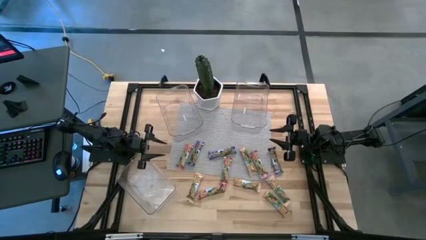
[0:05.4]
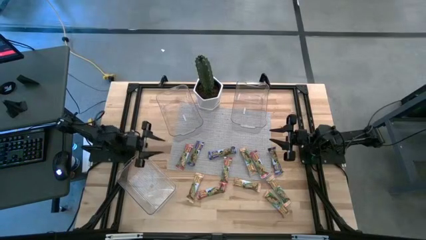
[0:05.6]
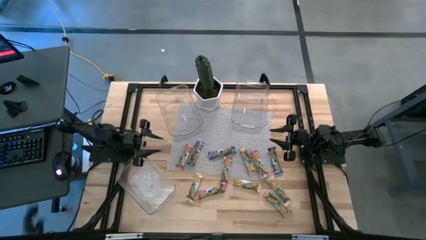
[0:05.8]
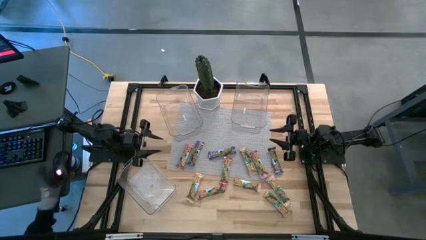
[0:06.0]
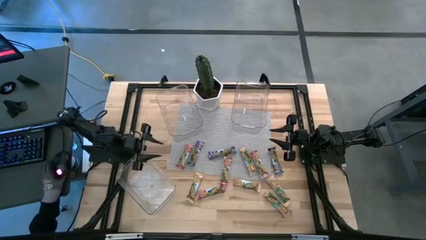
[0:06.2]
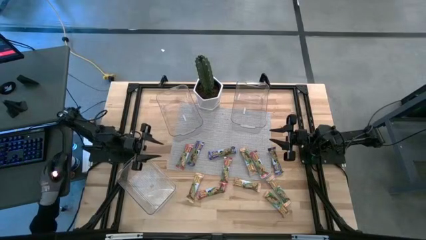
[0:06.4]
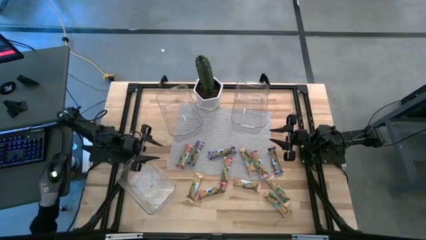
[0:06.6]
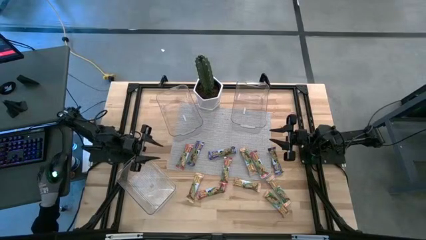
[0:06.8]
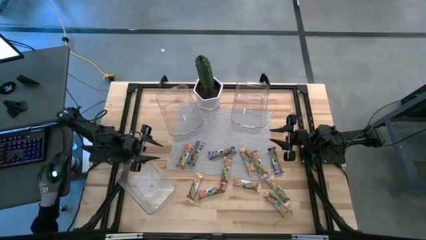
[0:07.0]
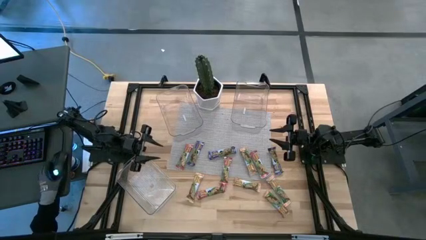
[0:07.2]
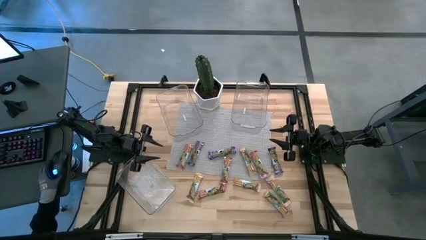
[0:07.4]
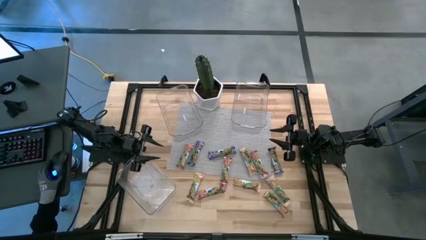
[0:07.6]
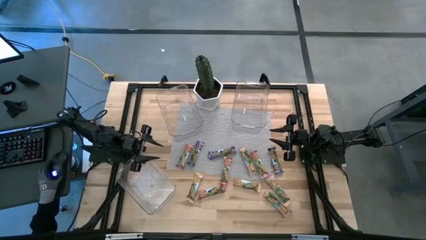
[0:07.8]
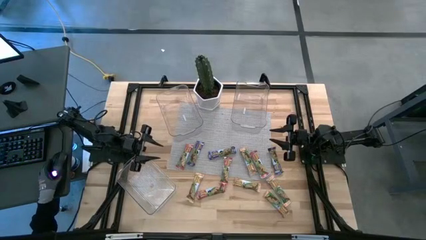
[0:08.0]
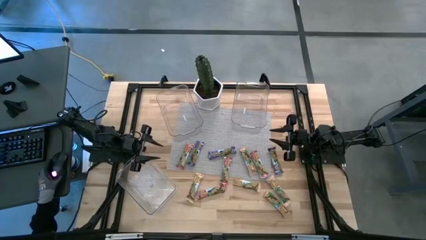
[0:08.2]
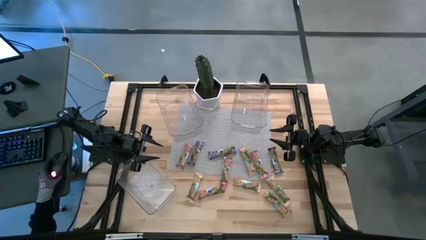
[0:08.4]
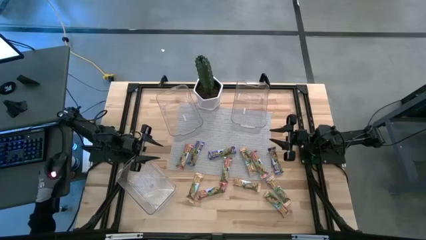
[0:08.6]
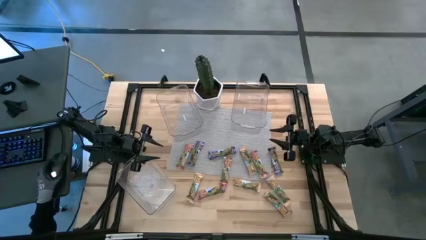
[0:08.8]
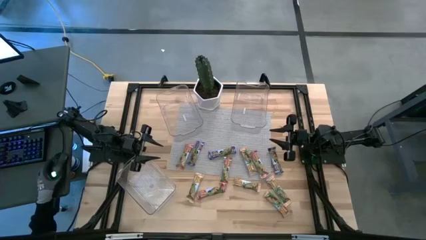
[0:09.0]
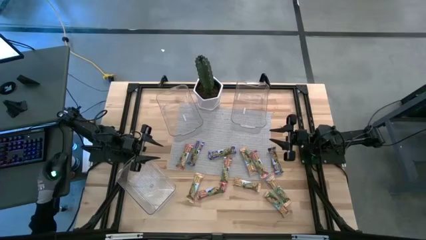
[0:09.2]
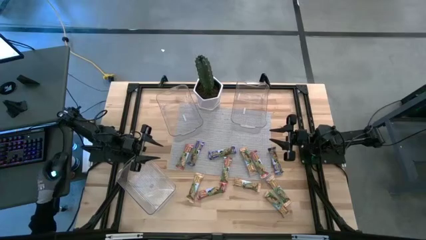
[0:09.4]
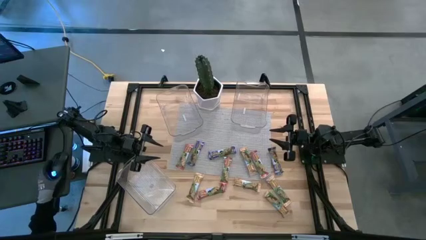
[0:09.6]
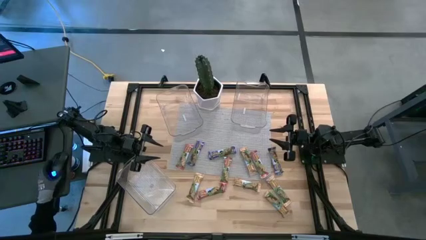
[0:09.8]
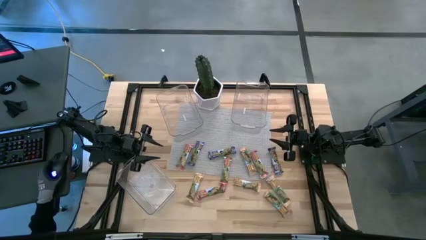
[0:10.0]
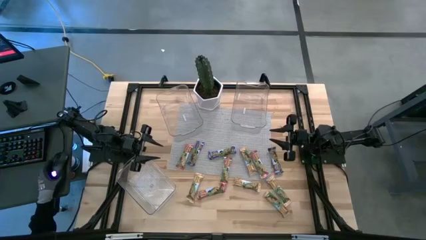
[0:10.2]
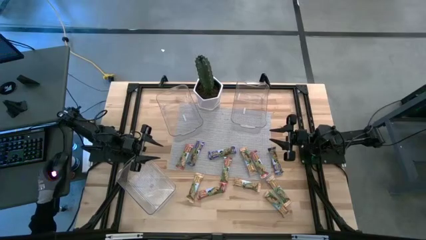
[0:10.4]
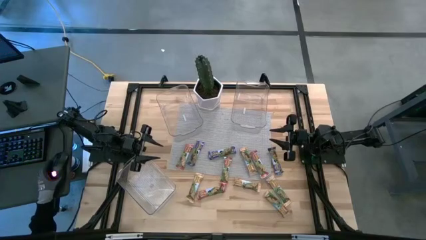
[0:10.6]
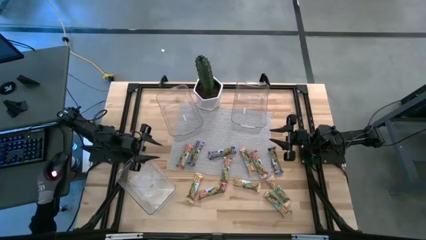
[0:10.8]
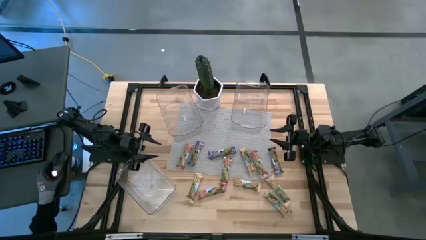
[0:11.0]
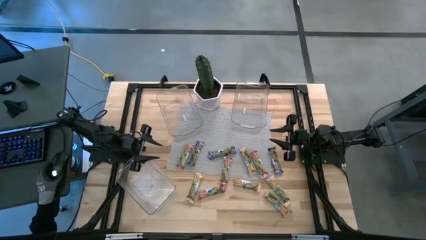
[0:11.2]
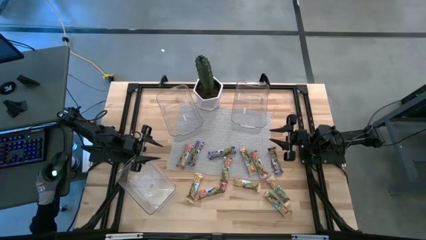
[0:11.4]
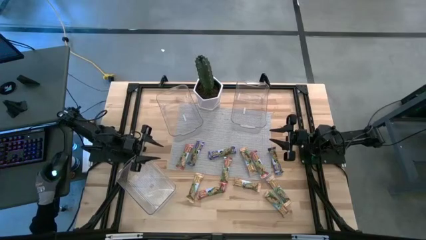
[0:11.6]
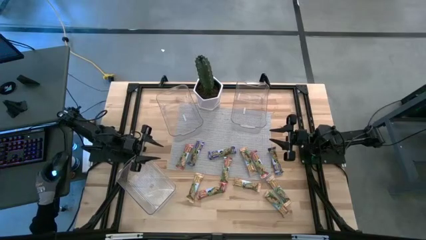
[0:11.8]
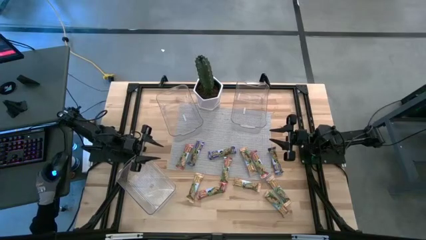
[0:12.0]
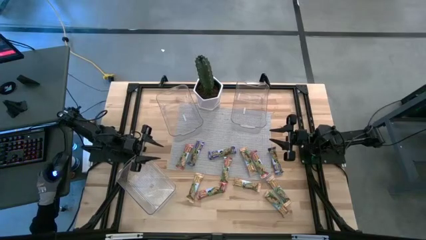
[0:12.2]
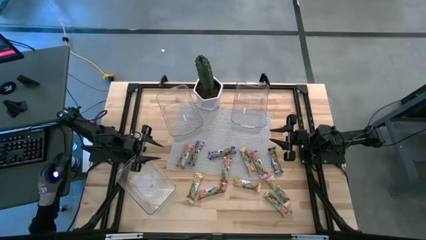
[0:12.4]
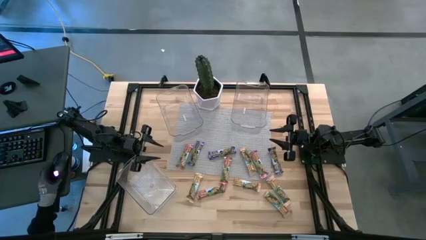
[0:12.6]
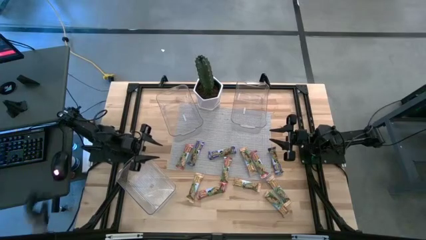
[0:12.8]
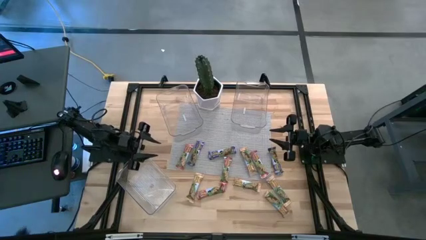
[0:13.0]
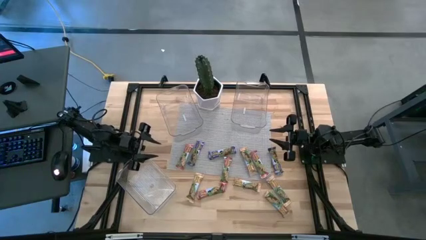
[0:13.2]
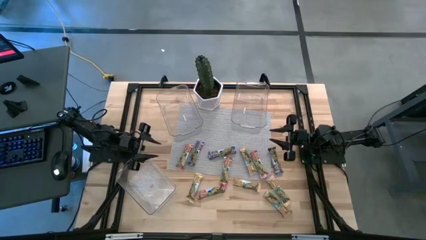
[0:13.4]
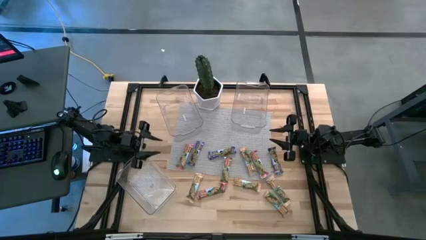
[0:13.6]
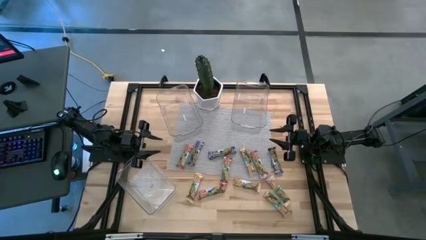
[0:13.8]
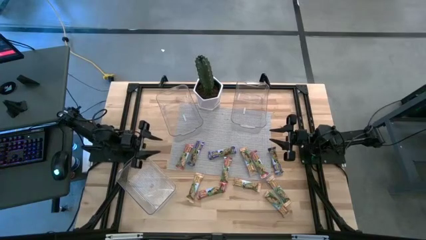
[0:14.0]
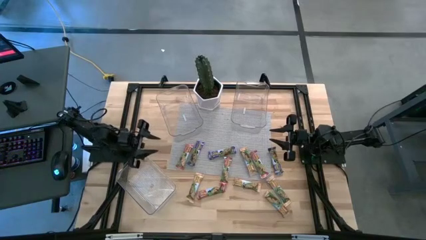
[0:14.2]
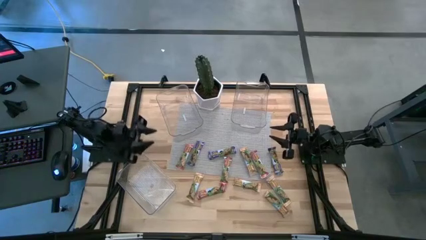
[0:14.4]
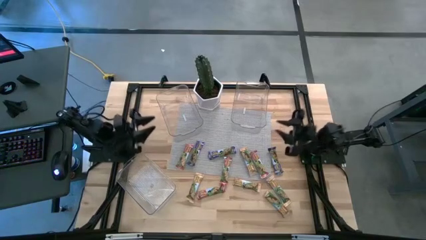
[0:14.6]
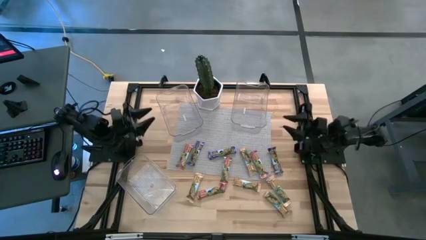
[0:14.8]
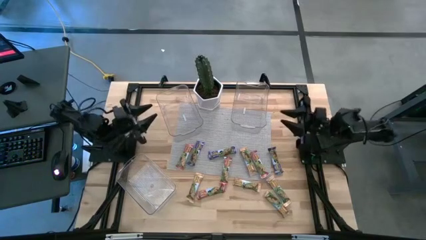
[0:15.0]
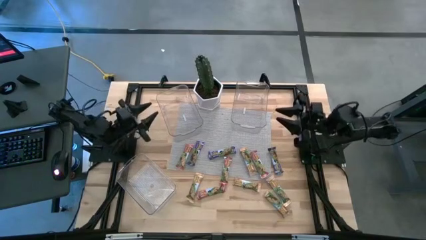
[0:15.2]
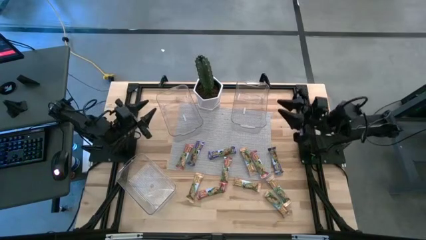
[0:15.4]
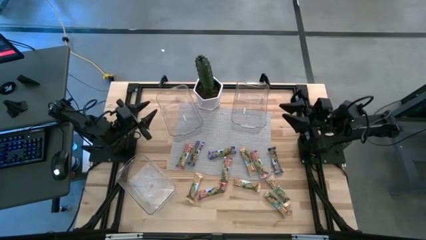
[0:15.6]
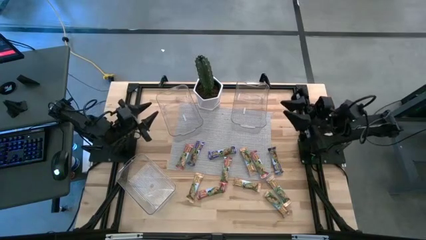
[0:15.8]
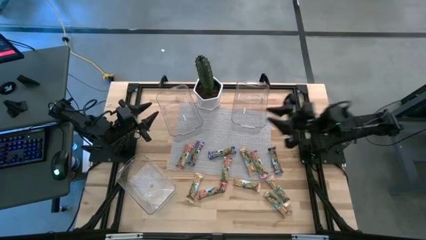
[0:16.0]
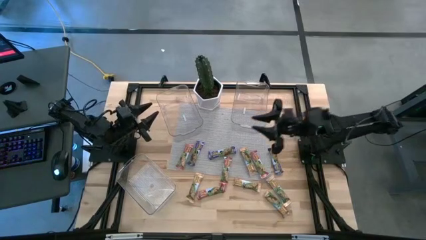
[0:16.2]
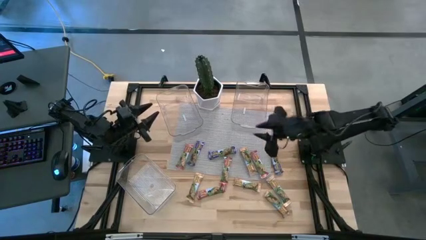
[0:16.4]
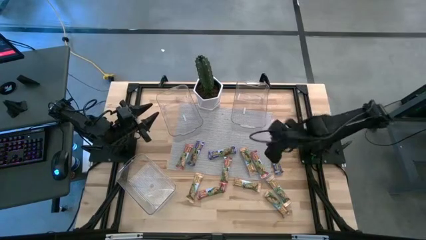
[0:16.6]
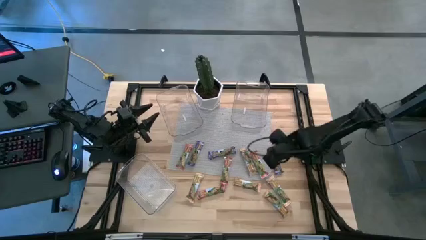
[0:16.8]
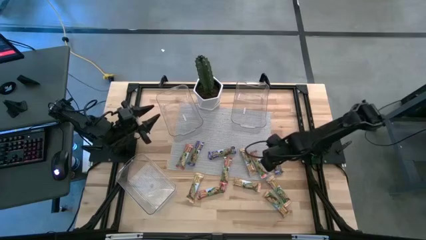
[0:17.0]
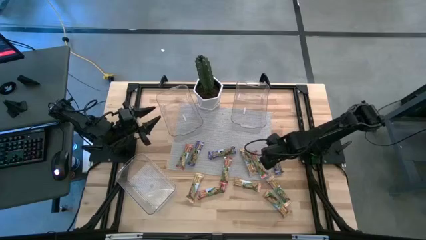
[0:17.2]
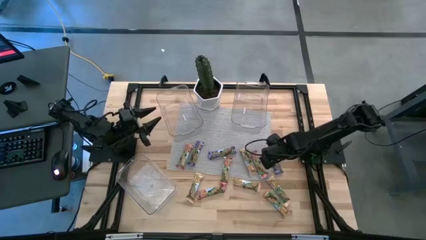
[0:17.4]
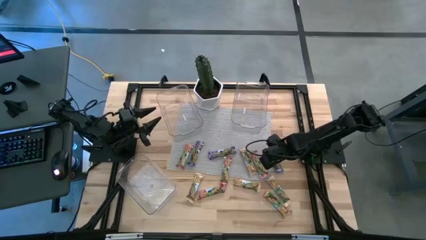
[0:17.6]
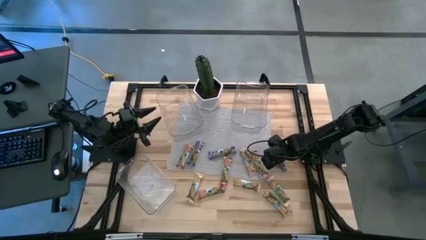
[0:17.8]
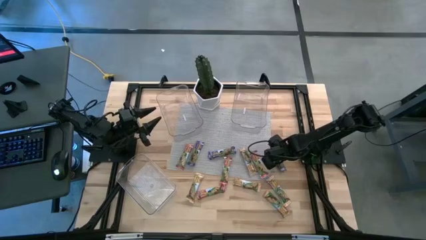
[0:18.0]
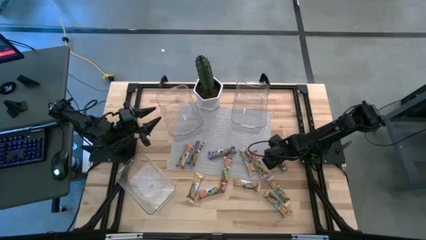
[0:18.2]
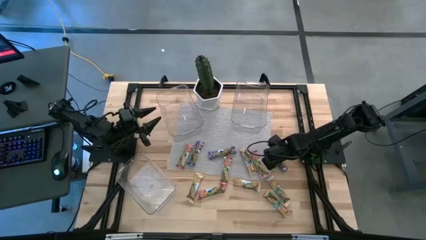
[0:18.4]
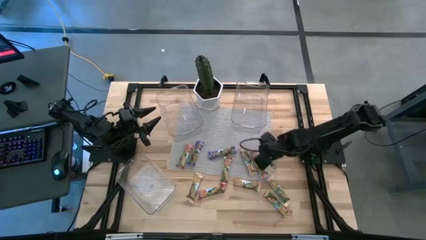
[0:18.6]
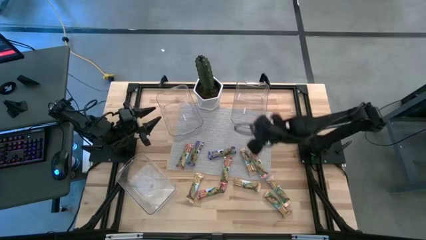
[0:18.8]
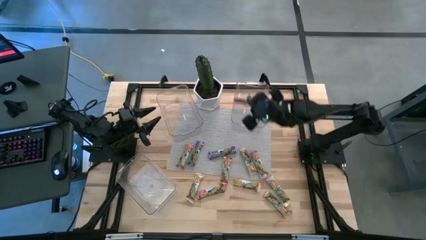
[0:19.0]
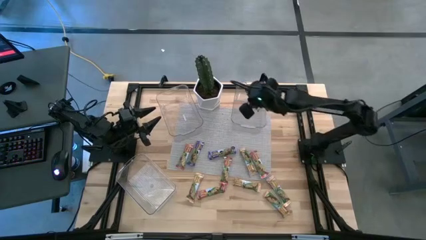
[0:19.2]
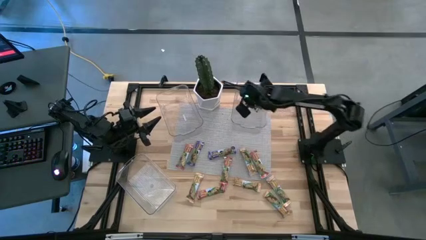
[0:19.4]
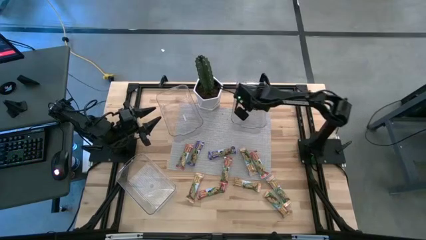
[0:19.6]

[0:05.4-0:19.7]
Task: Pick and place Granola Bars by type
Put the blue granola bar into the top right transparent bin
